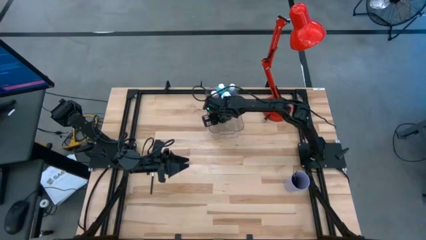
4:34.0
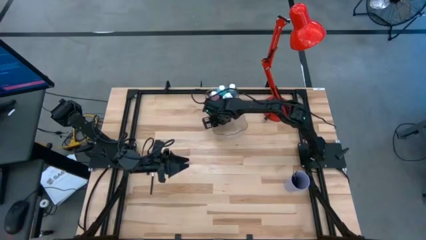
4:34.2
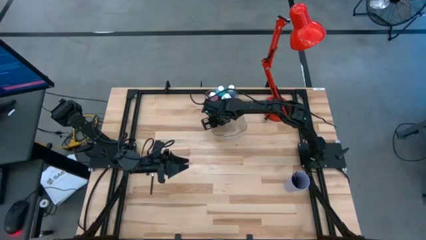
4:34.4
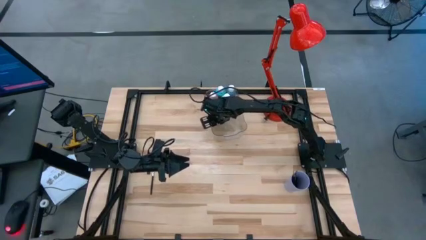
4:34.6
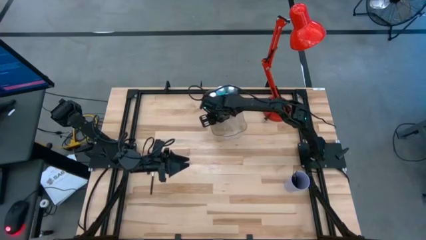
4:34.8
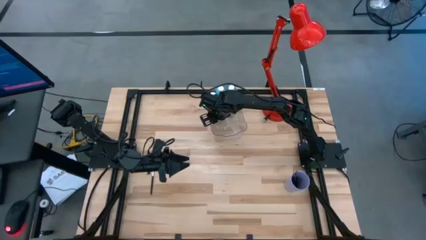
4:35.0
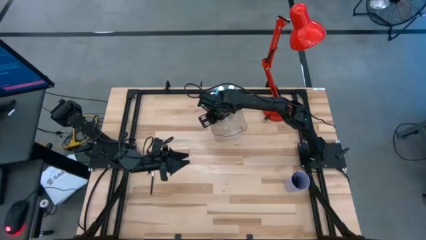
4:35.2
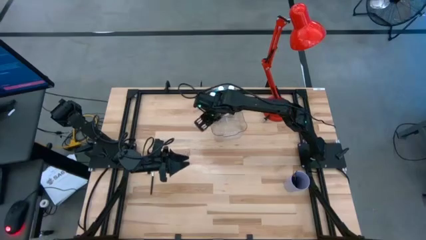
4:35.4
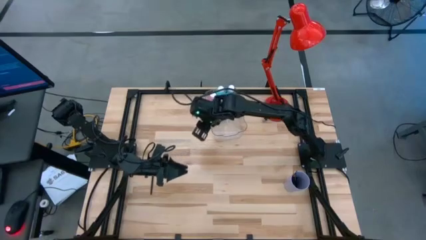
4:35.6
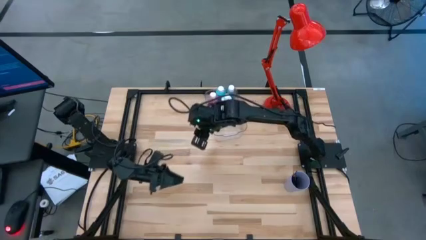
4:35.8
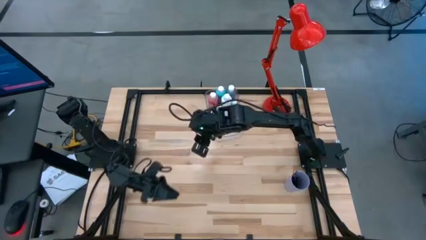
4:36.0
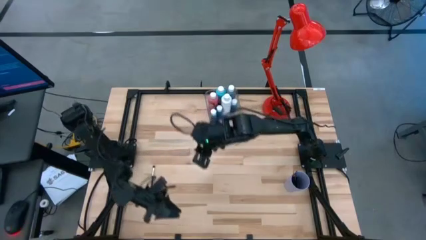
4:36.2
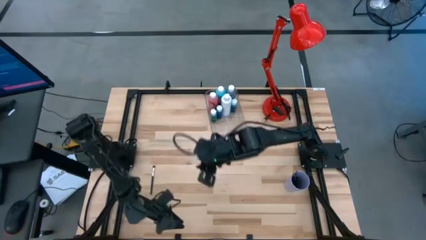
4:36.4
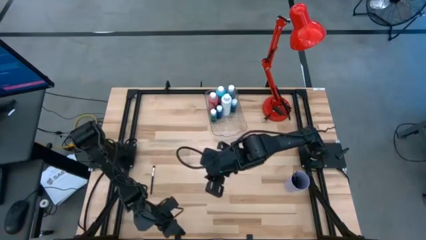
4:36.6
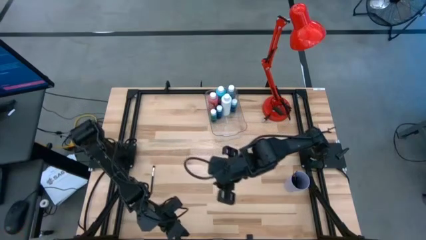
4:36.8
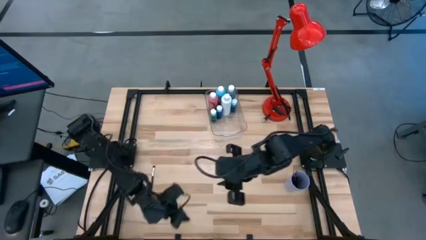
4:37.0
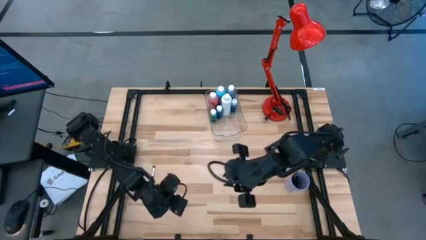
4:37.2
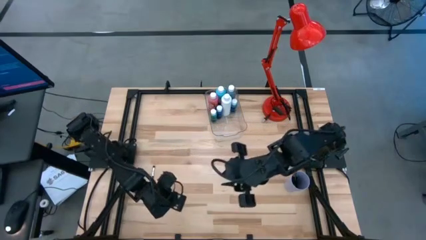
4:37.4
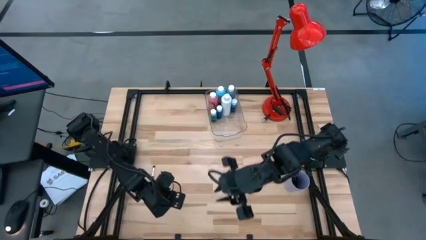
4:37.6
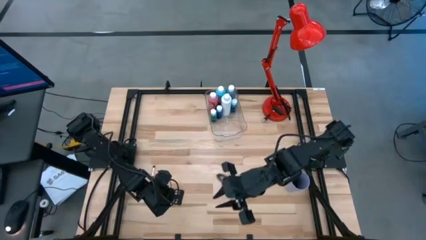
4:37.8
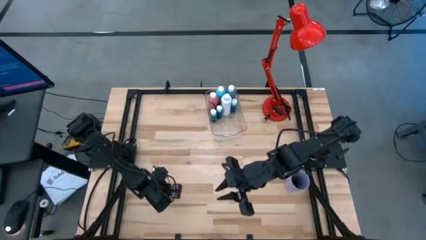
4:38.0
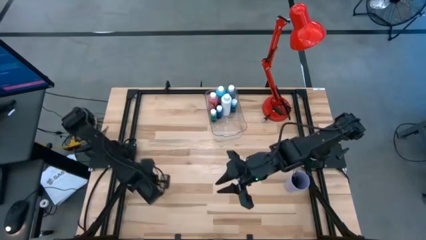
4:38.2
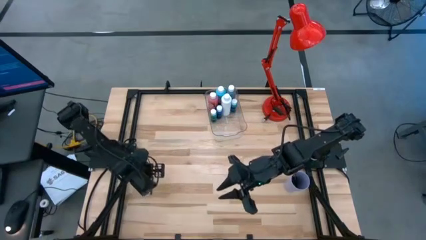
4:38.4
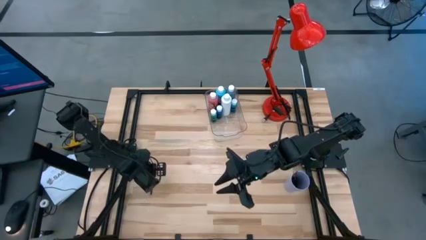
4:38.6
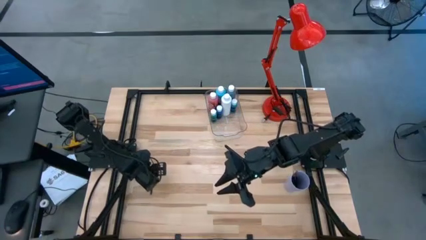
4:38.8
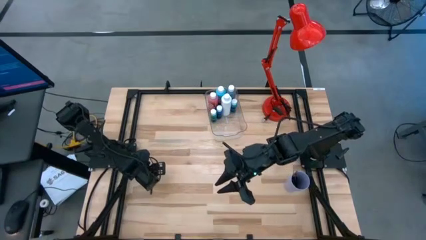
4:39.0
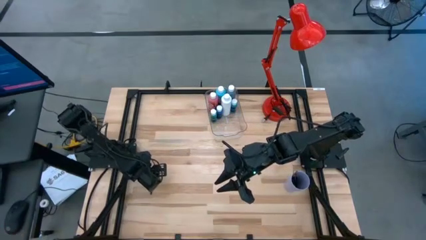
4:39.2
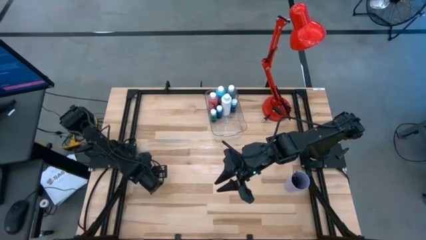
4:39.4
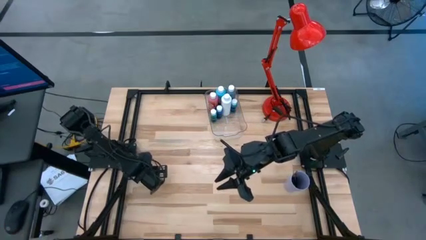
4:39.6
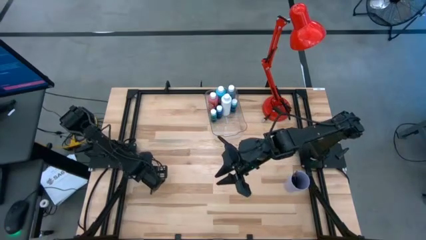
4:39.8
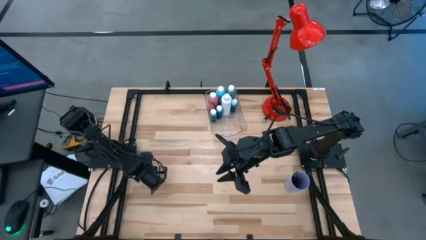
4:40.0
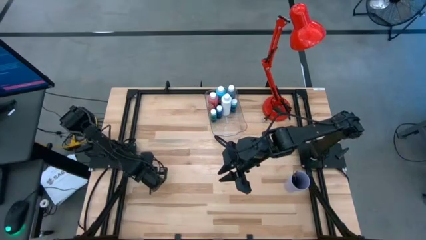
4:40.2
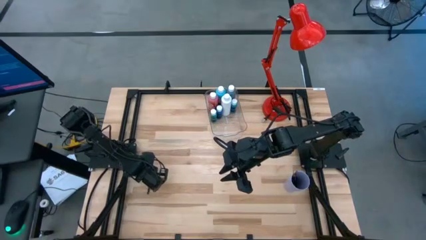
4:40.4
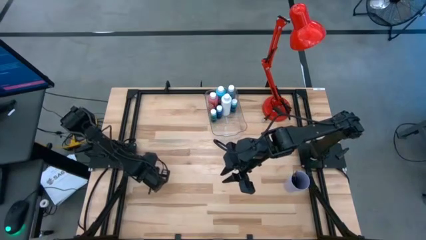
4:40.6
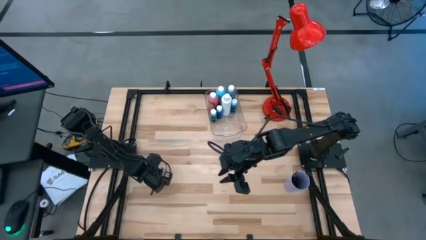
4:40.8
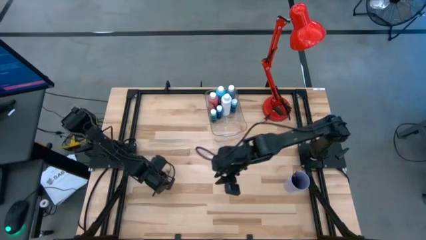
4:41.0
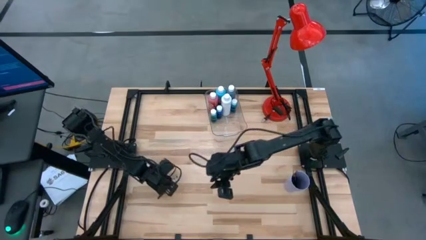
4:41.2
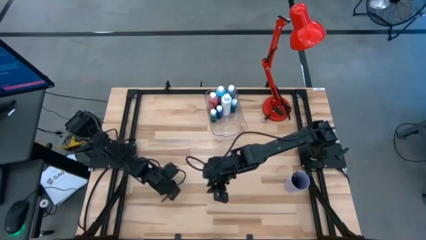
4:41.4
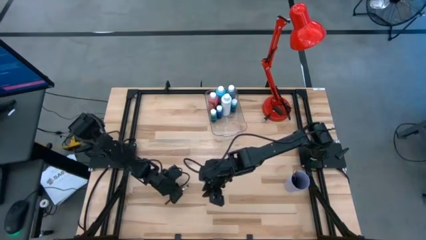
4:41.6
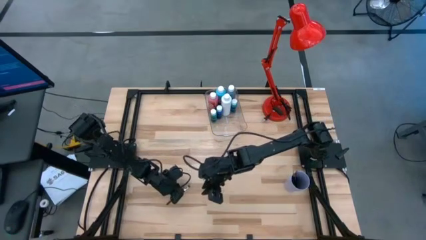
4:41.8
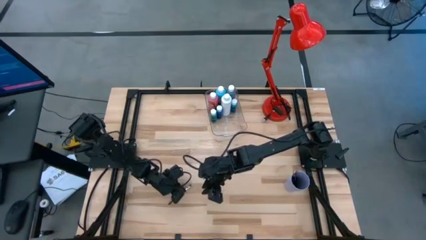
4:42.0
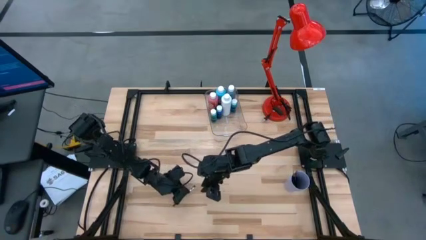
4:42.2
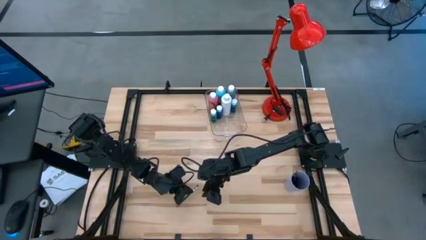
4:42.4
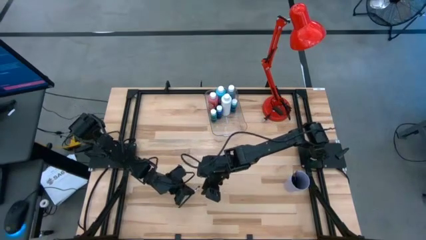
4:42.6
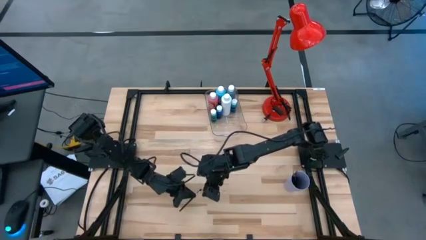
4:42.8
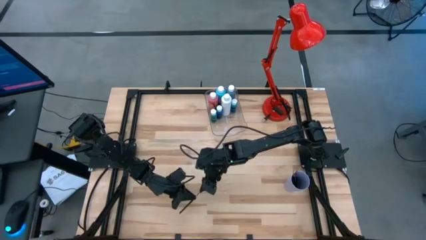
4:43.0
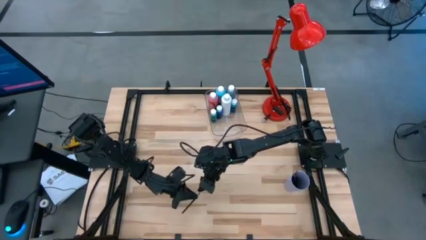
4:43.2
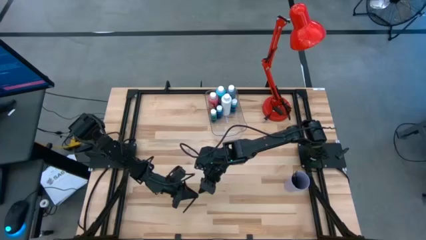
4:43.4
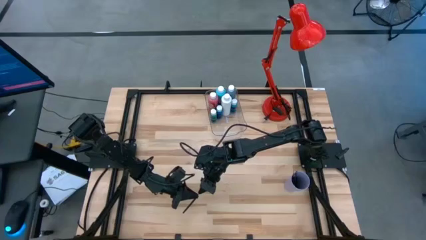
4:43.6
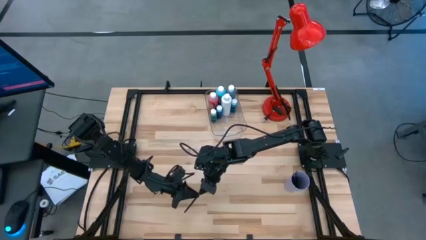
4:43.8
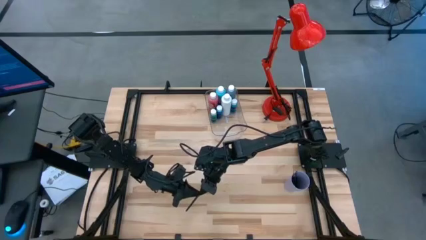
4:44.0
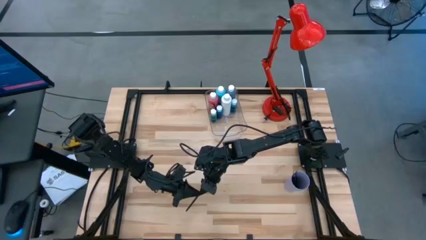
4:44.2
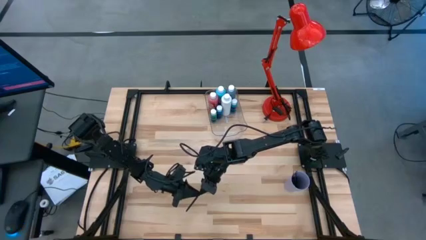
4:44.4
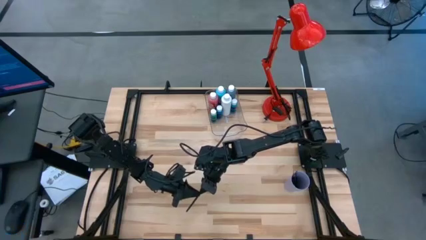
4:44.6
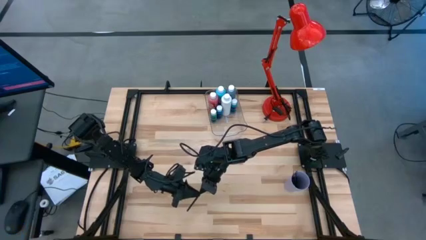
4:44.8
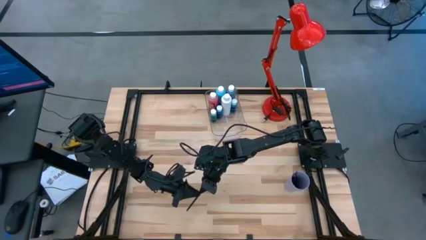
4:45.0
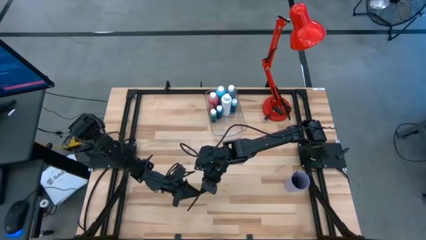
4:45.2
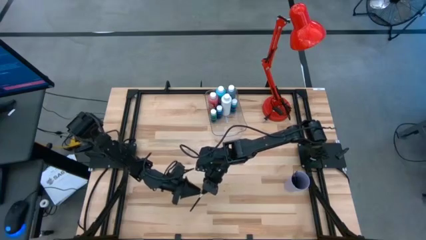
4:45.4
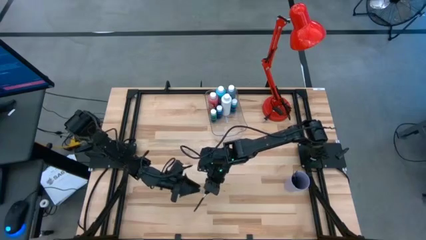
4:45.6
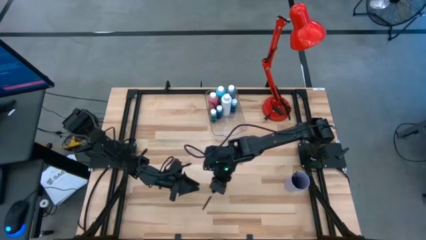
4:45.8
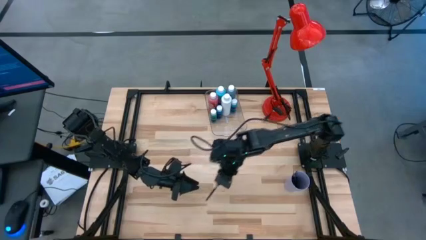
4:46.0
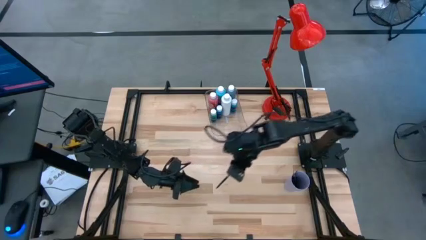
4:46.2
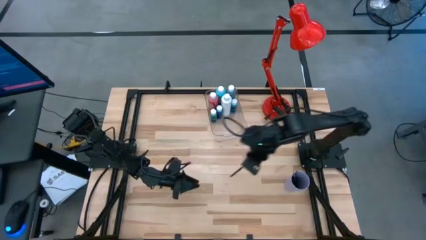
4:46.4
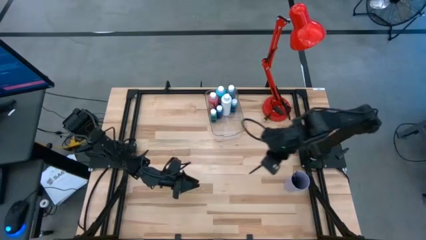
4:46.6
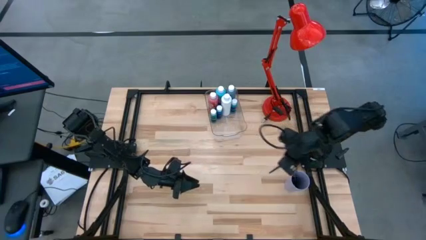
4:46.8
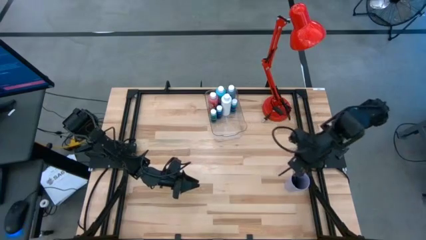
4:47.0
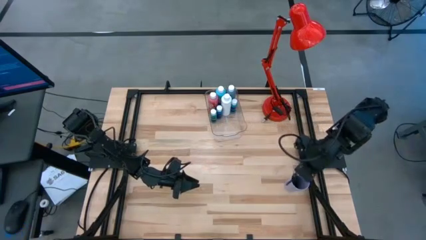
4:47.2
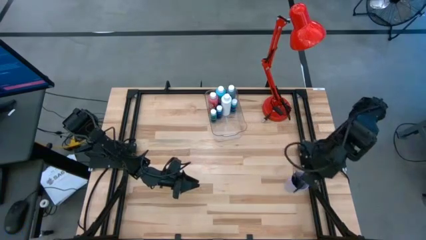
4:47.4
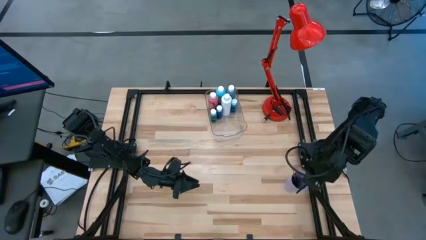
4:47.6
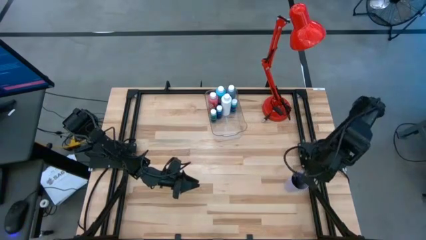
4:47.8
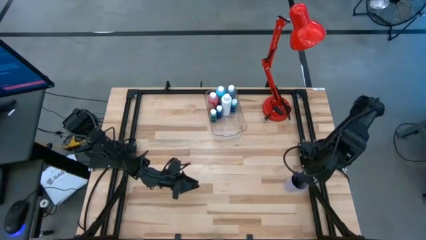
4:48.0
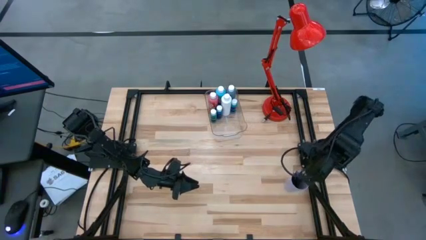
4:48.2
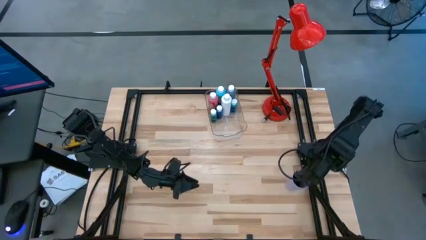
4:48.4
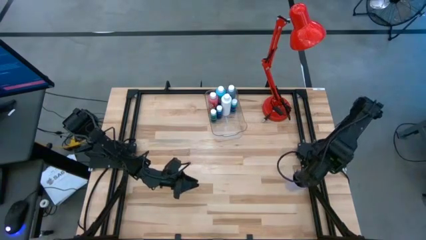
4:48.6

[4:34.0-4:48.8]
Task: Pick & Place Paint Supplies
Put the silver paintbrush into the purple cup
